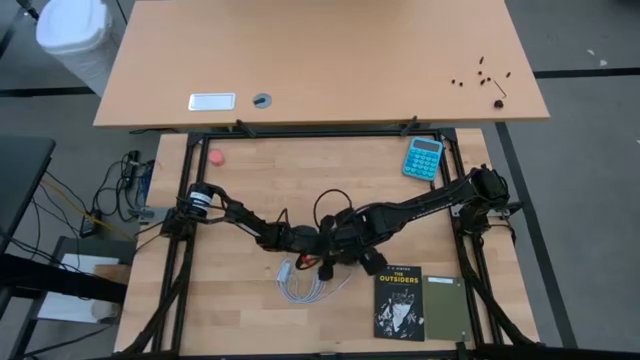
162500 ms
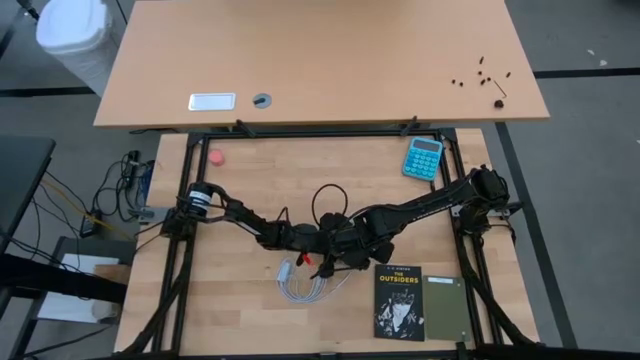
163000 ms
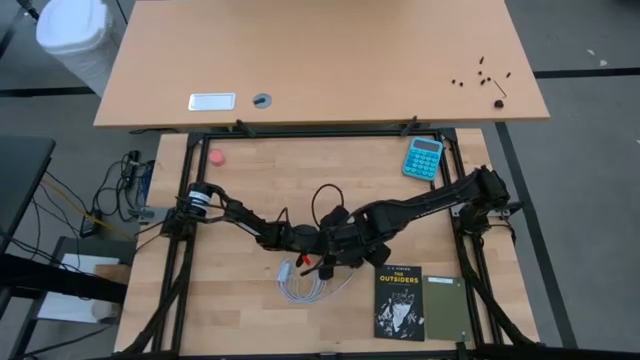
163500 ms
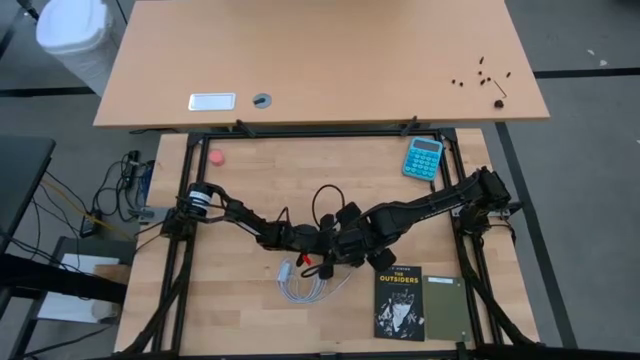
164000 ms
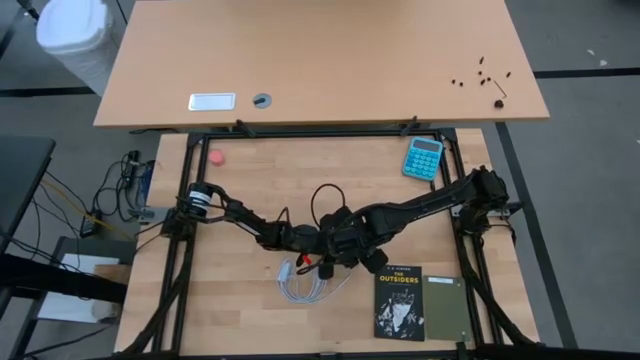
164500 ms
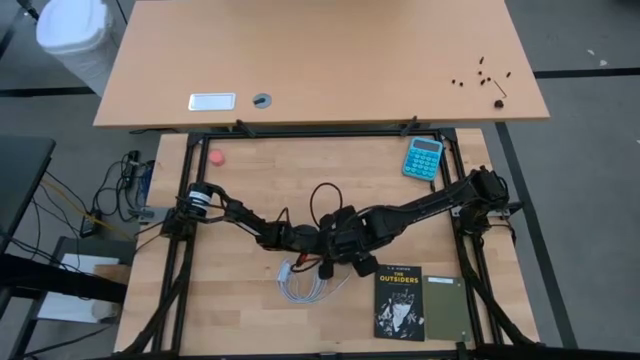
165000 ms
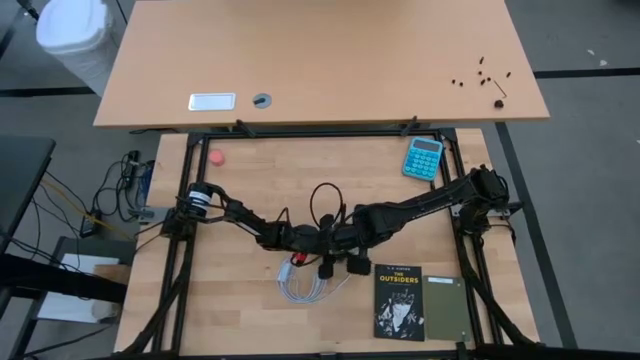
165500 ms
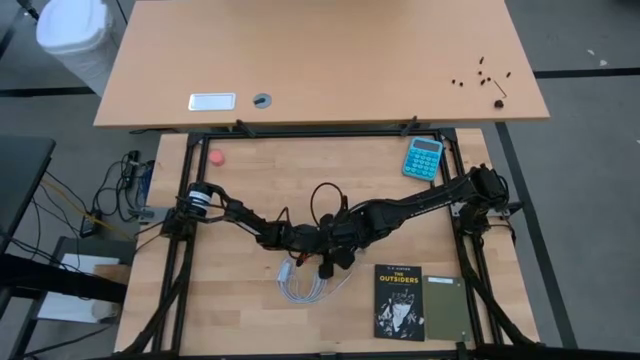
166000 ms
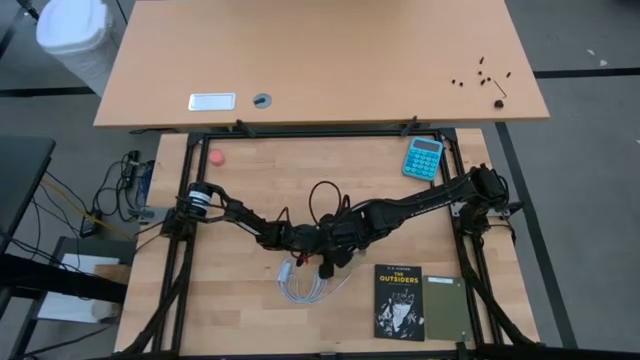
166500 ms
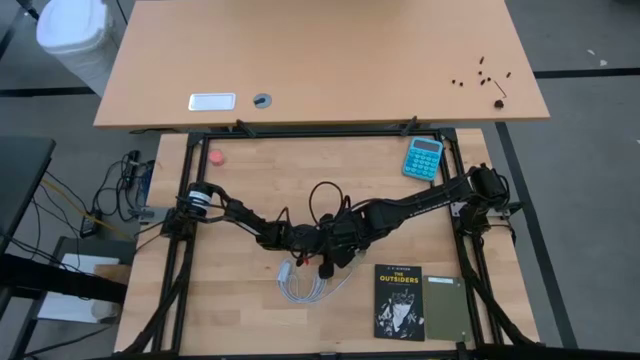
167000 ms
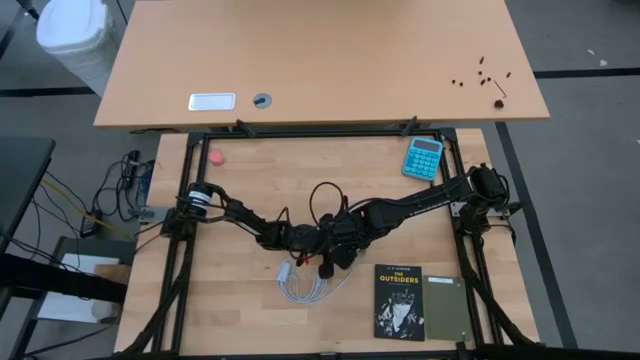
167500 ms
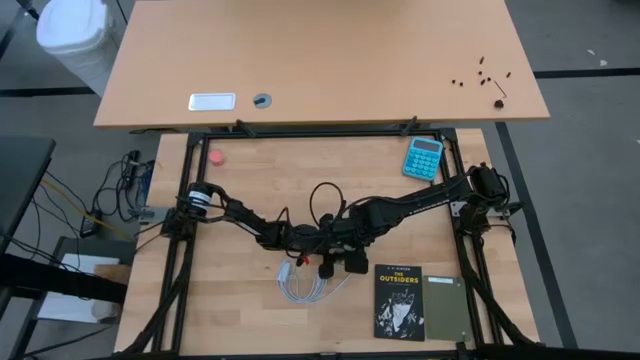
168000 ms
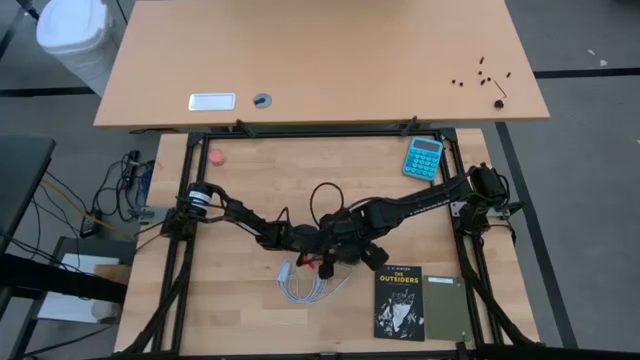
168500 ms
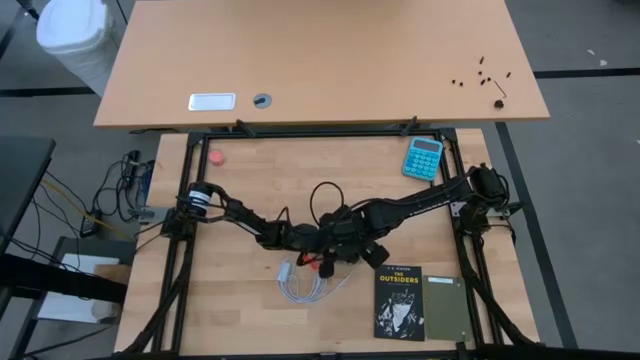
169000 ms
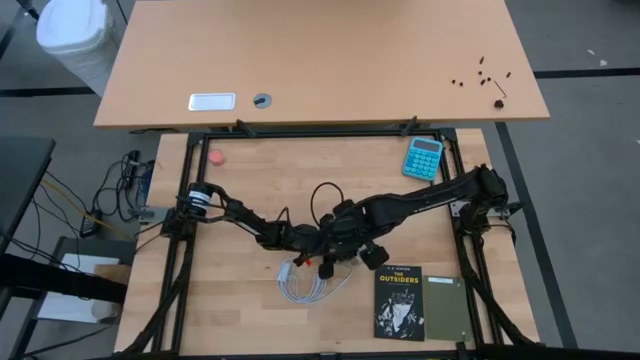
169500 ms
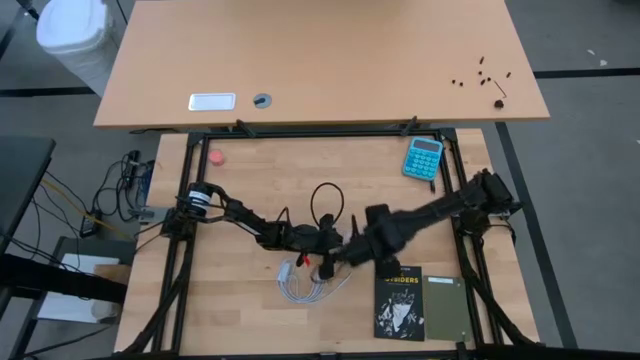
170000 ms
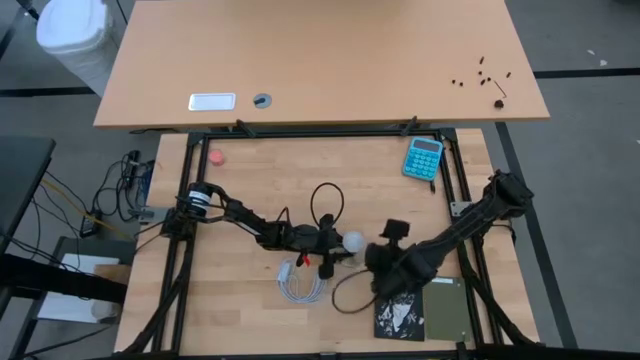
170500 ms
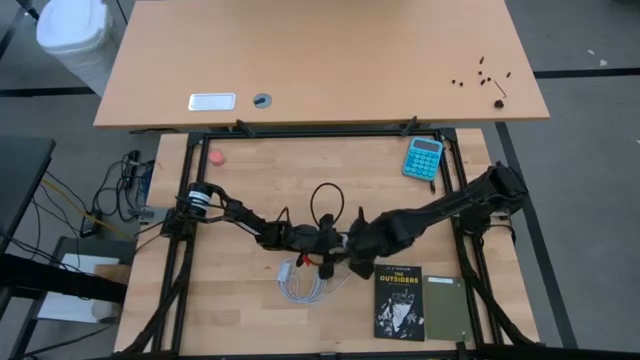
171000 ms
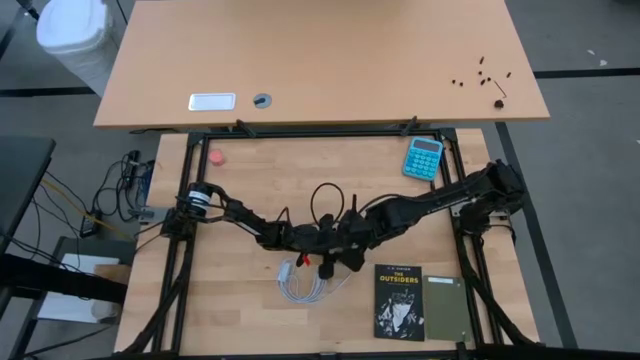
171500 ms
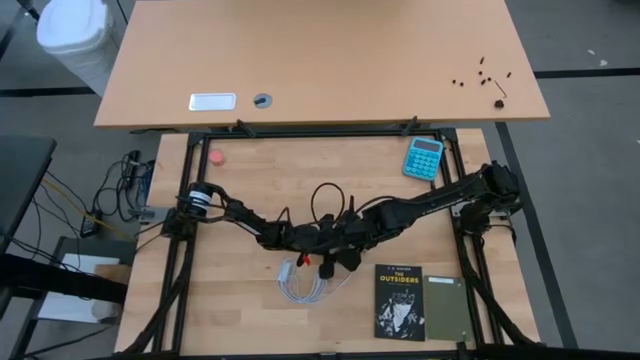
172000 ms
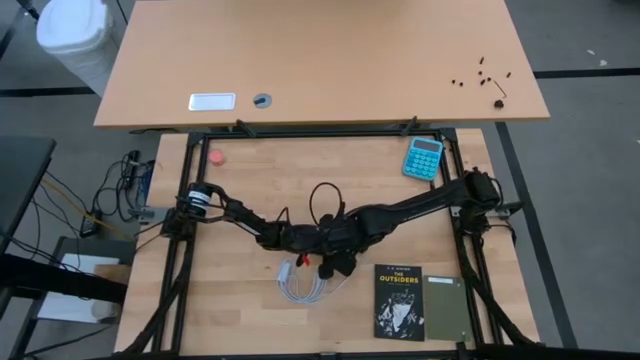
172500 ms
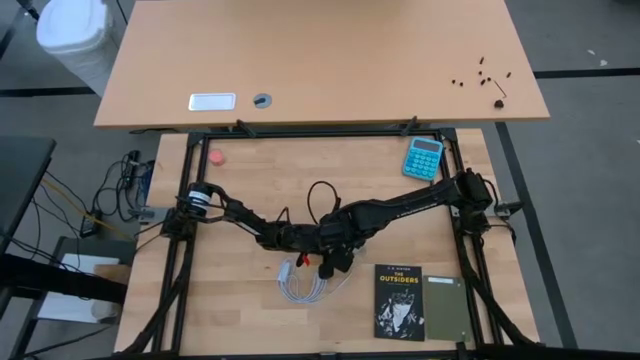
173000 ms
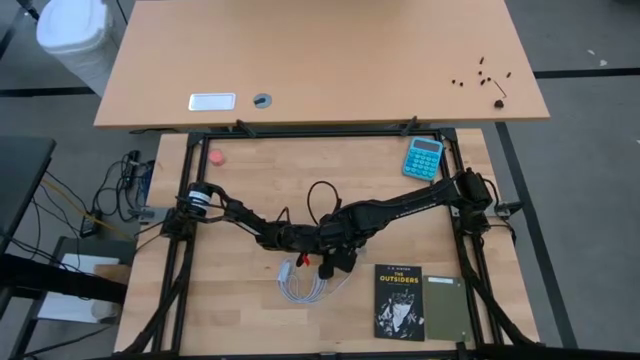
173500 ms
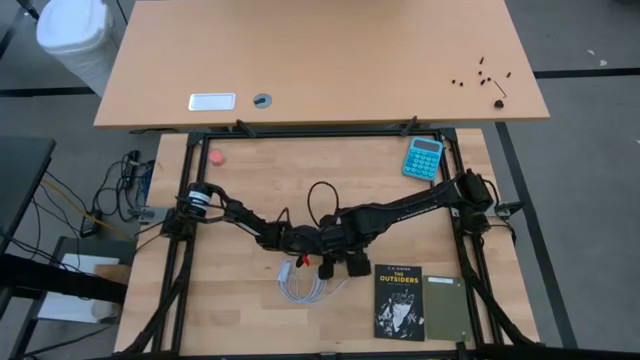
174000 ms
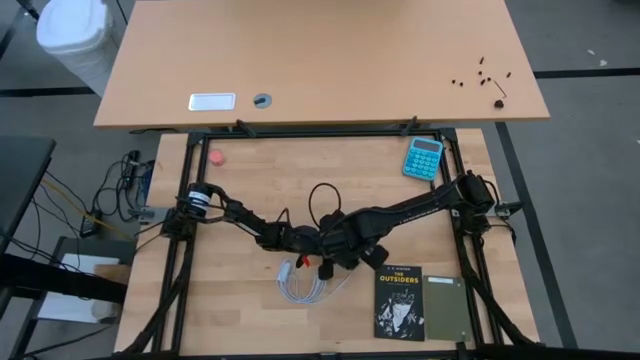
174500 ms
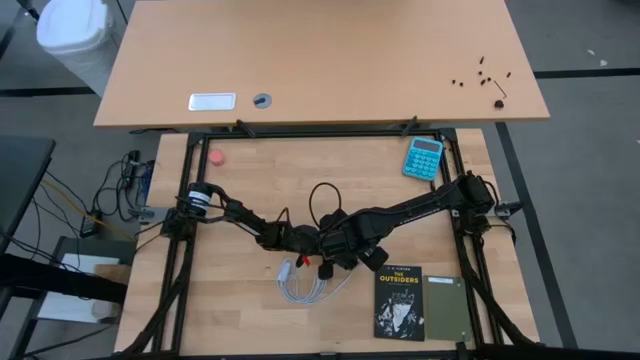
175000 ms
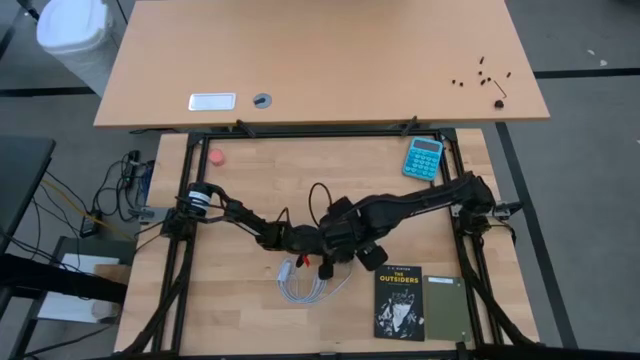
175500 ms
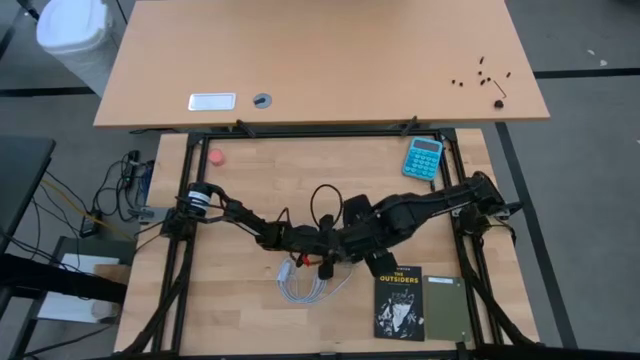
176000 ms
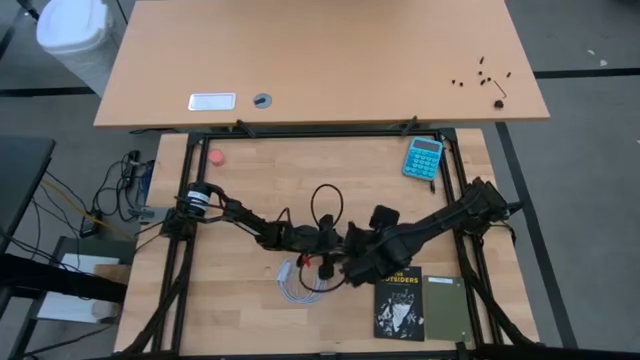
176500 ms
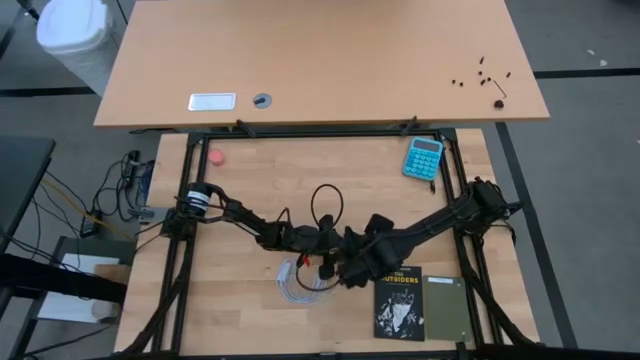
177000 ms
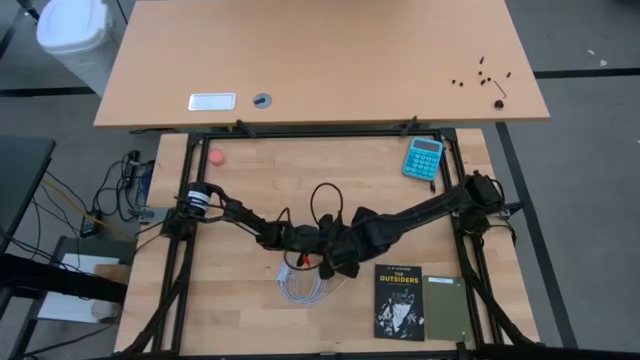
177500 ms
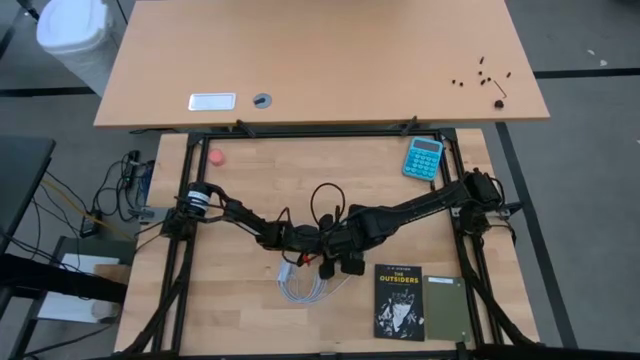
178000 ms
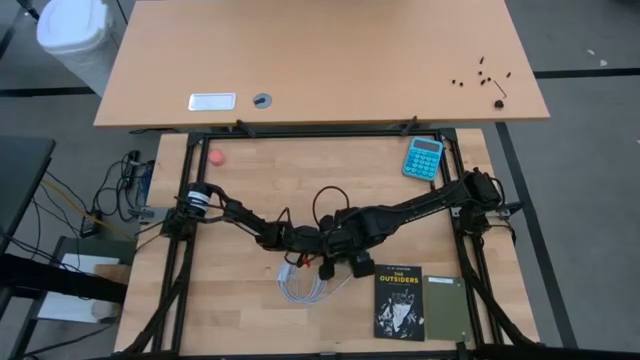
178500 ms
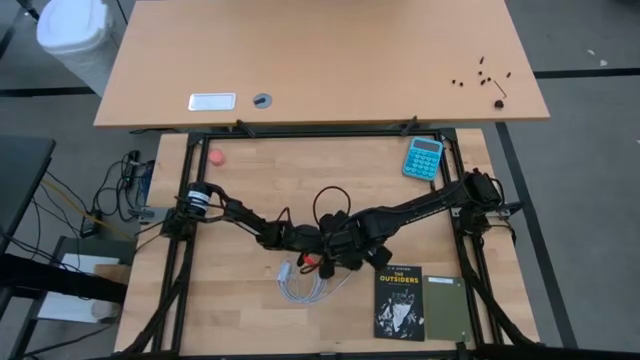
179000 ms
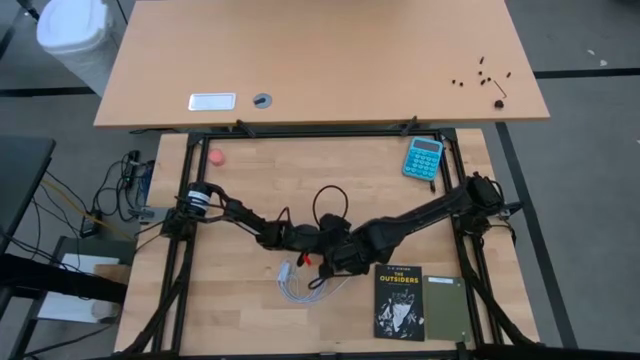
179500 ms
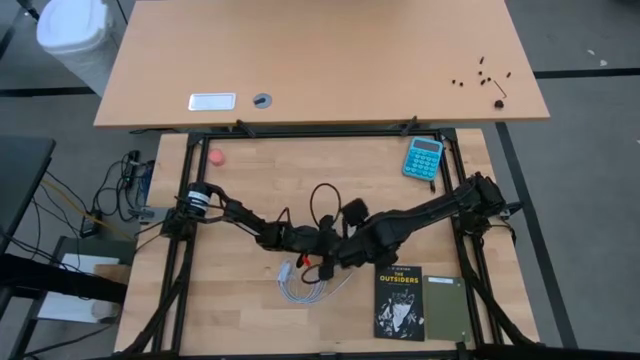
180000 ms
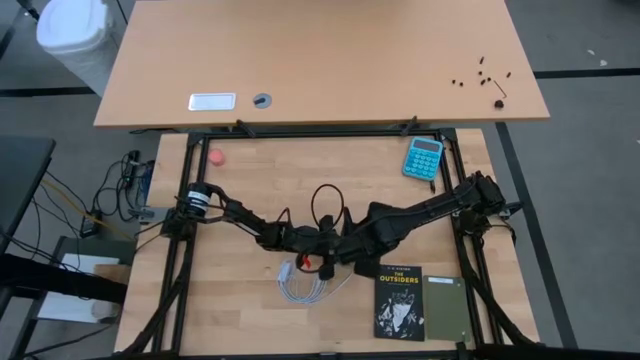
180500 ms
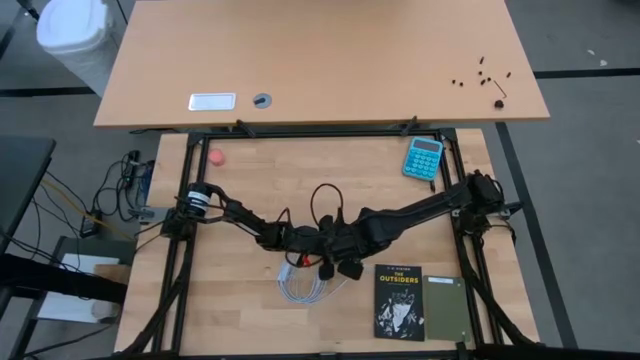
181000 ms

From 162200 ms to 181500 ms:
Task: Screw lightbulb
Remove the white lightbulb into the silver lamp

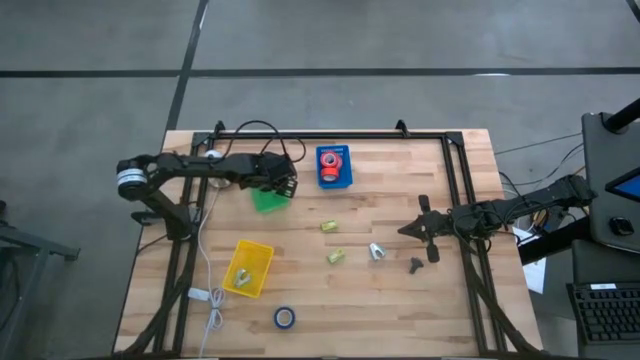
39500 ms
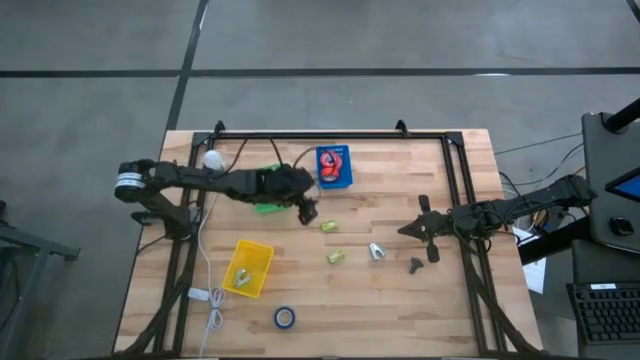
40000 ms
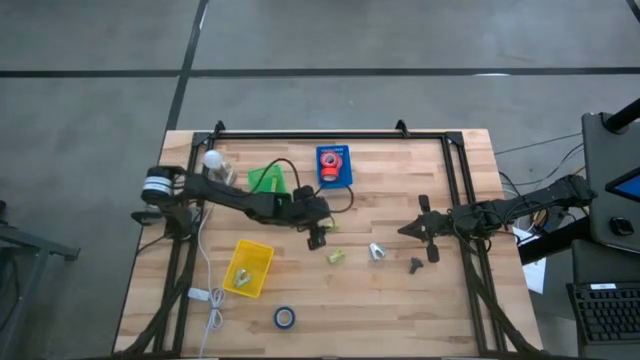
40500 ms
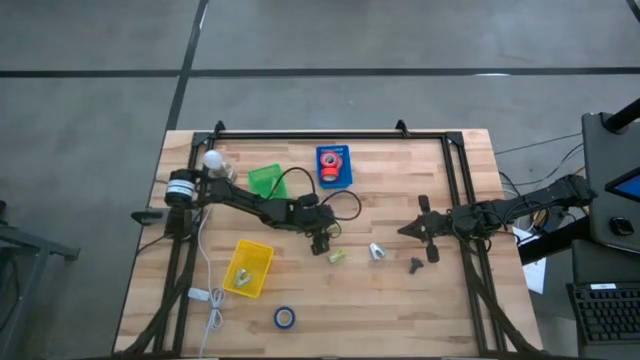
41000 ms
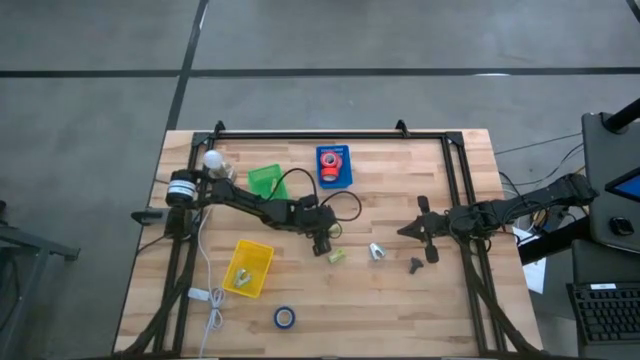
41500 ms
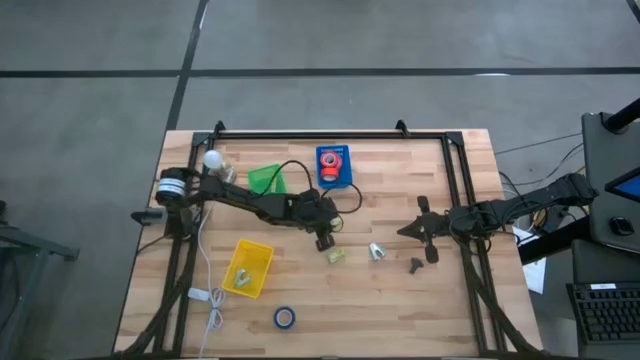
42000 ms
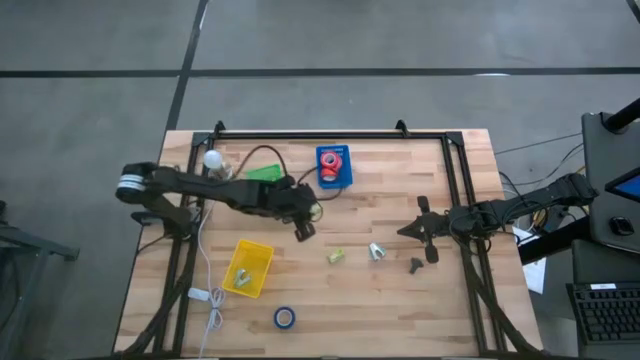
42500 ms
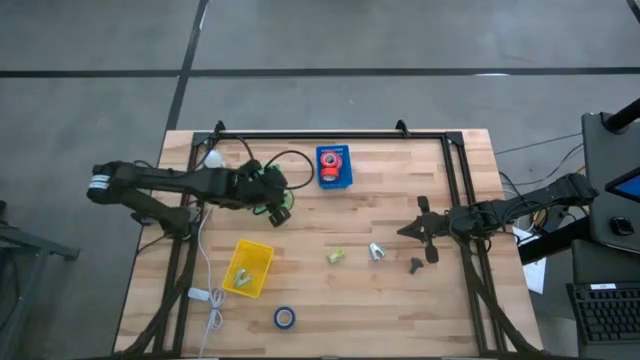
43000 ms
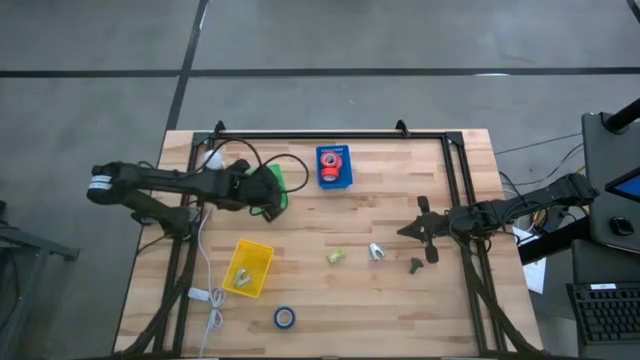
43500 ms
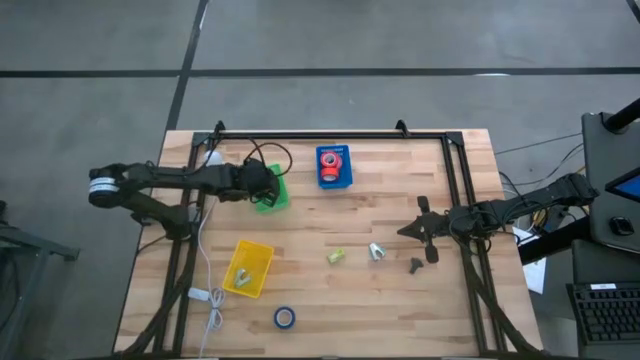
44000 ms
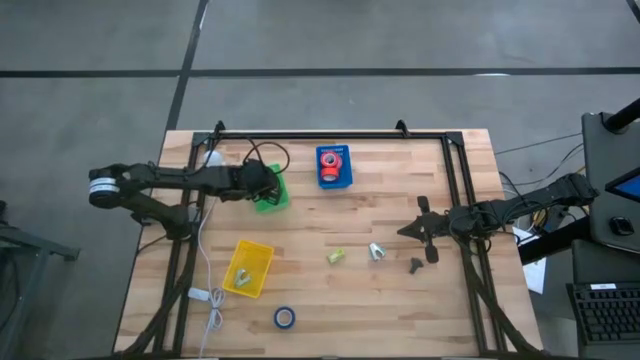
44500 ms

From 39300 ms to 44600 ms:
Task: Pick and place Stapler, Stapler remover, tape
Put the top green staple wire box into the green bin
